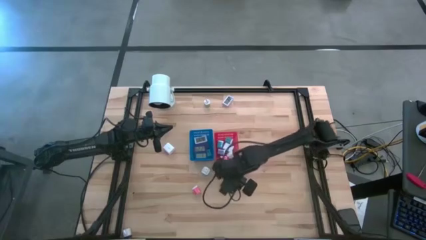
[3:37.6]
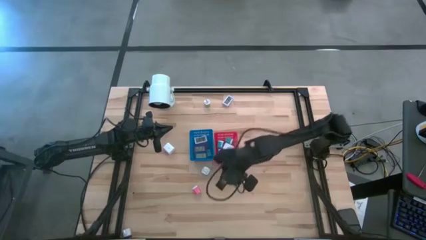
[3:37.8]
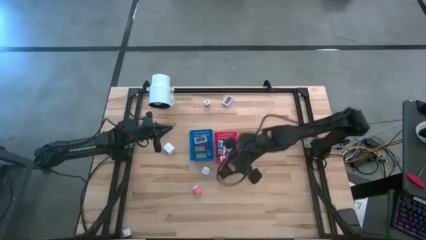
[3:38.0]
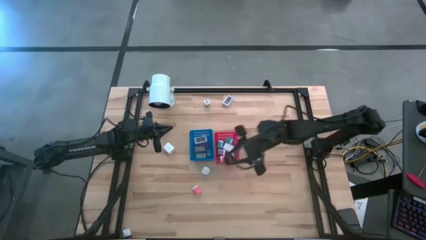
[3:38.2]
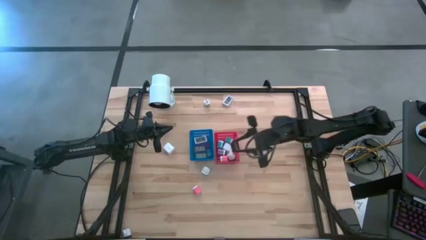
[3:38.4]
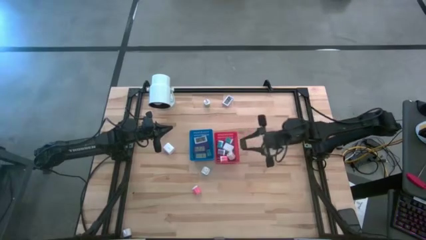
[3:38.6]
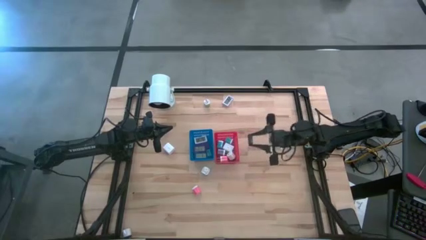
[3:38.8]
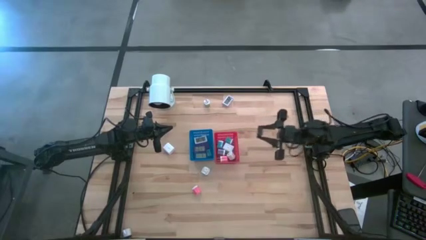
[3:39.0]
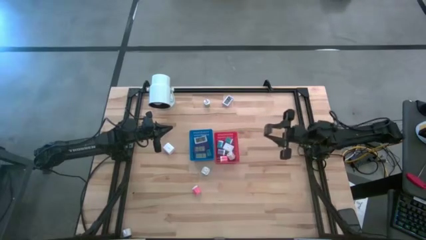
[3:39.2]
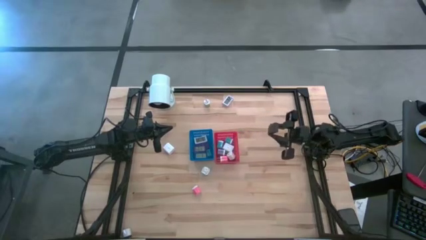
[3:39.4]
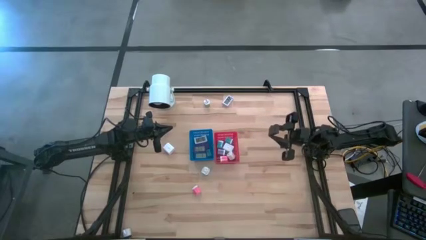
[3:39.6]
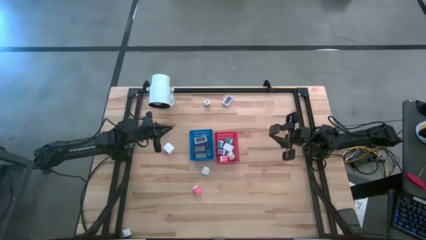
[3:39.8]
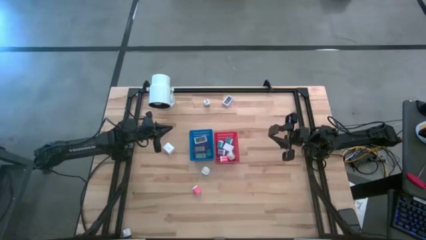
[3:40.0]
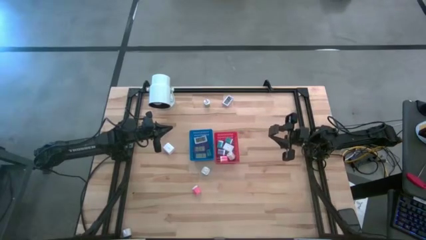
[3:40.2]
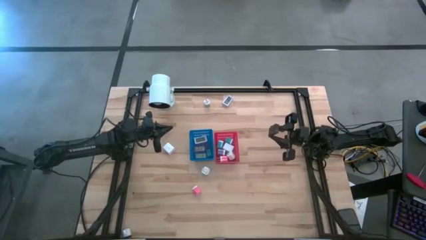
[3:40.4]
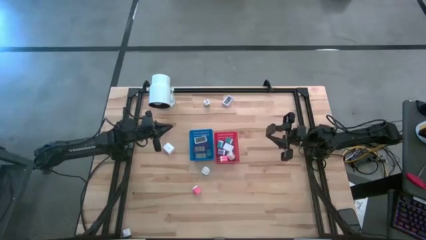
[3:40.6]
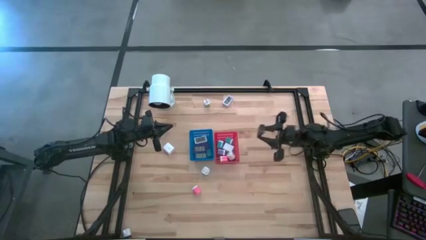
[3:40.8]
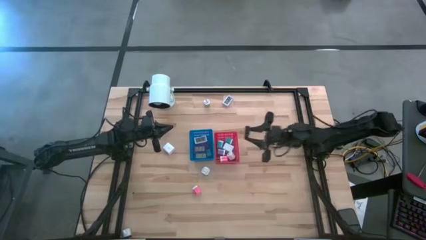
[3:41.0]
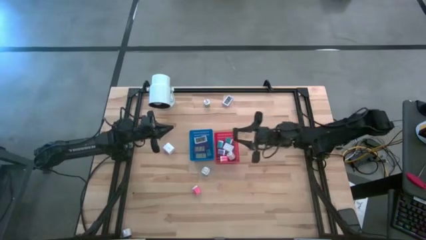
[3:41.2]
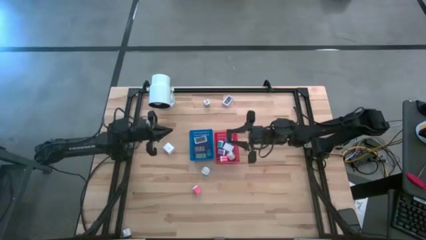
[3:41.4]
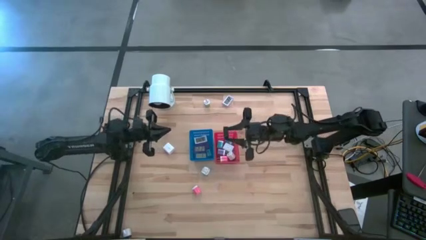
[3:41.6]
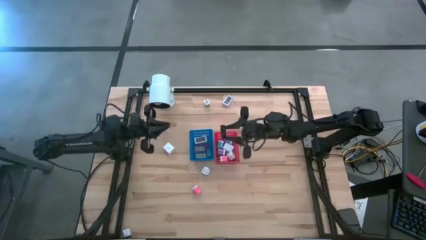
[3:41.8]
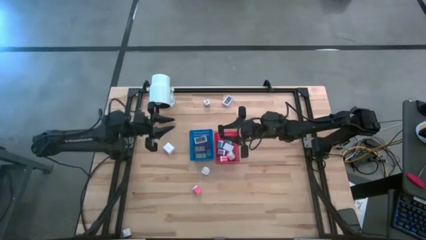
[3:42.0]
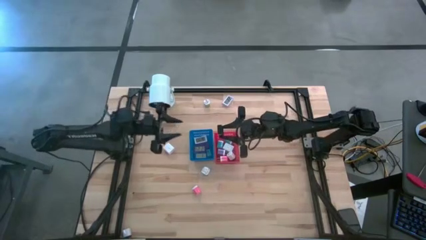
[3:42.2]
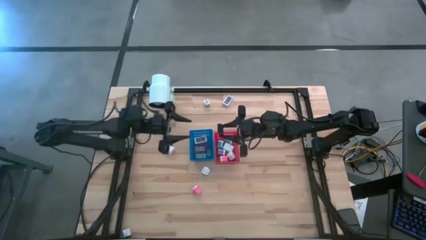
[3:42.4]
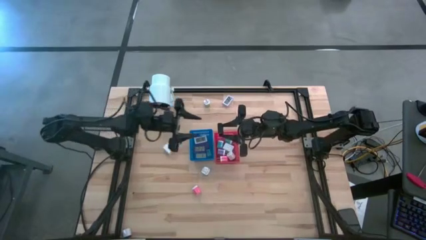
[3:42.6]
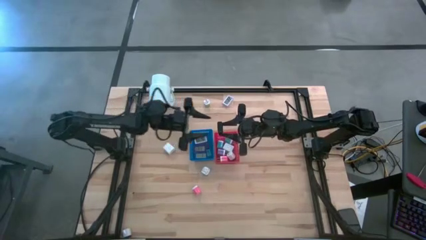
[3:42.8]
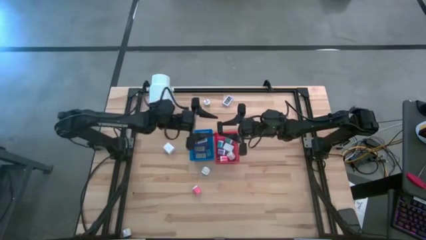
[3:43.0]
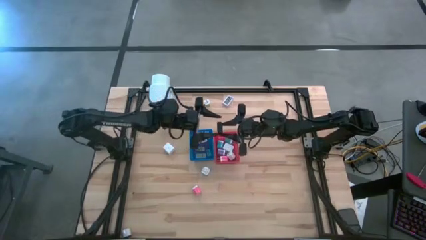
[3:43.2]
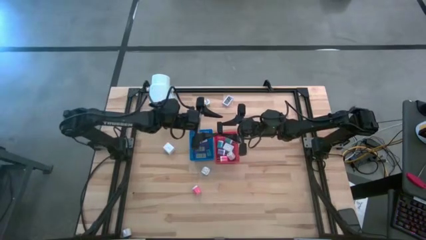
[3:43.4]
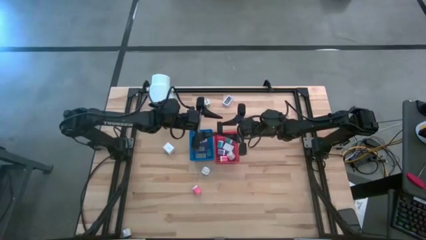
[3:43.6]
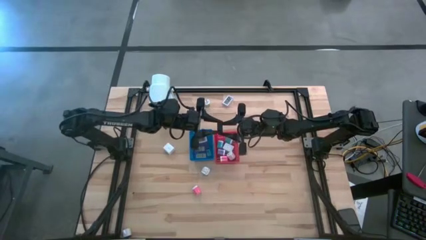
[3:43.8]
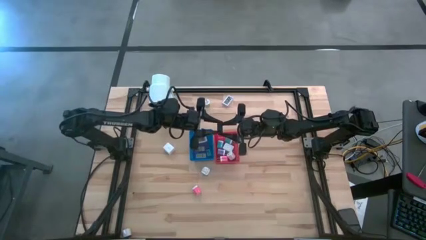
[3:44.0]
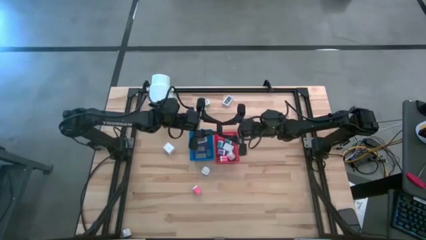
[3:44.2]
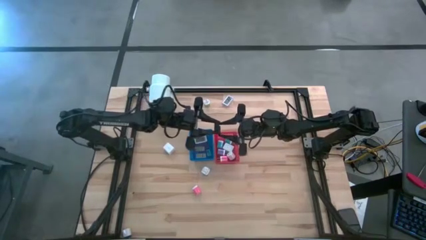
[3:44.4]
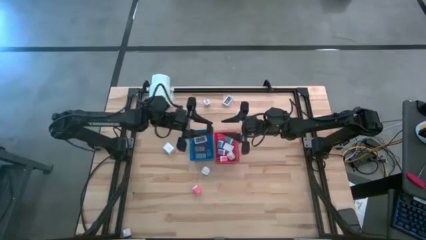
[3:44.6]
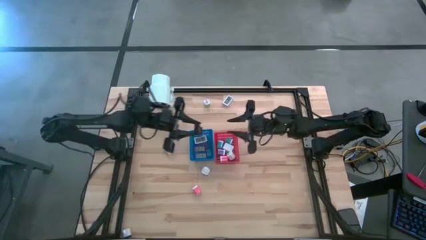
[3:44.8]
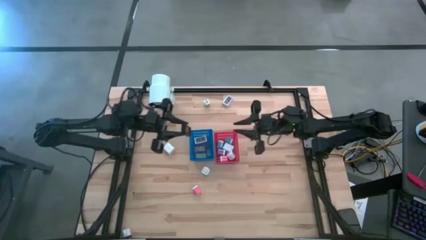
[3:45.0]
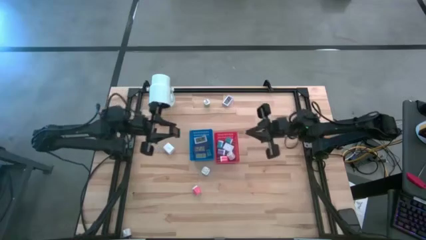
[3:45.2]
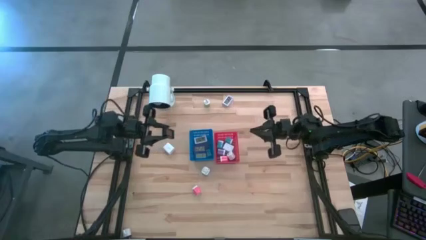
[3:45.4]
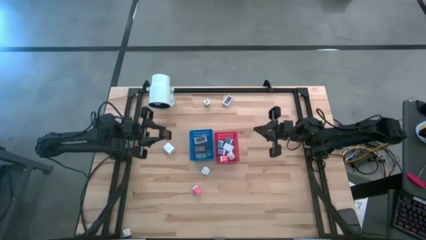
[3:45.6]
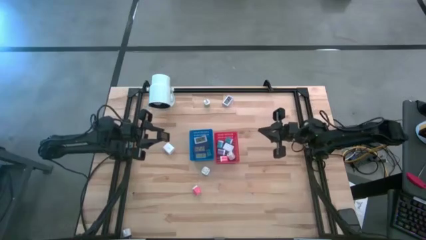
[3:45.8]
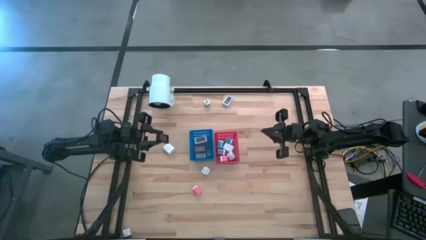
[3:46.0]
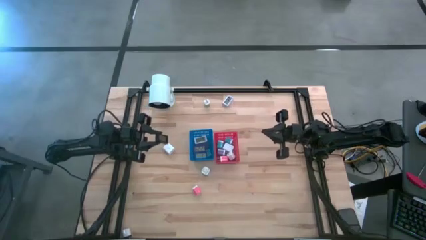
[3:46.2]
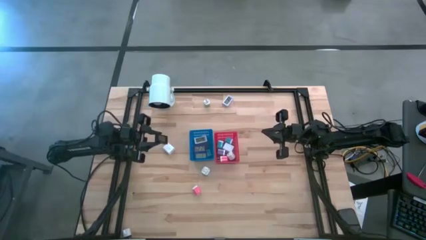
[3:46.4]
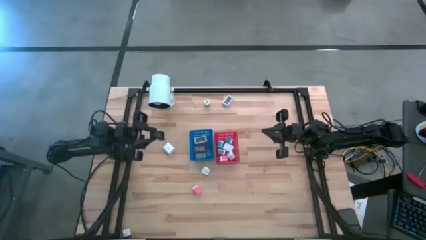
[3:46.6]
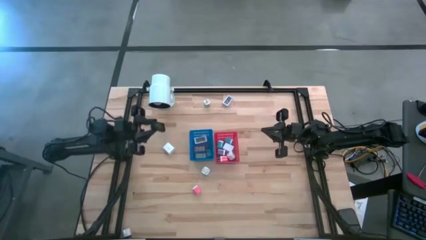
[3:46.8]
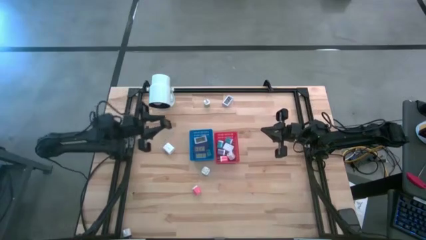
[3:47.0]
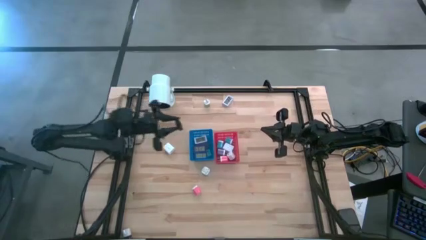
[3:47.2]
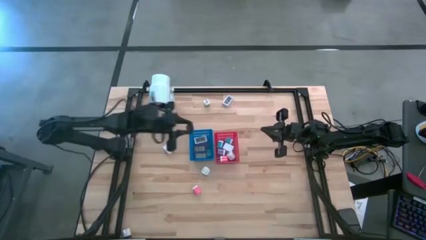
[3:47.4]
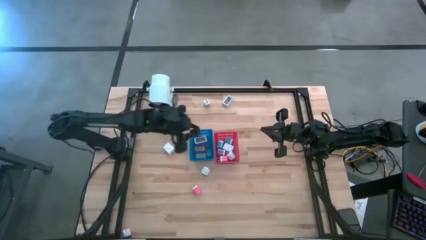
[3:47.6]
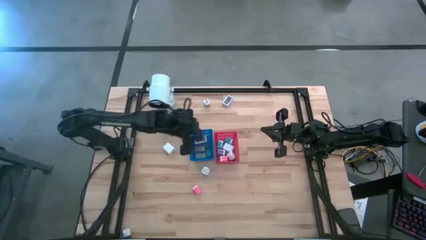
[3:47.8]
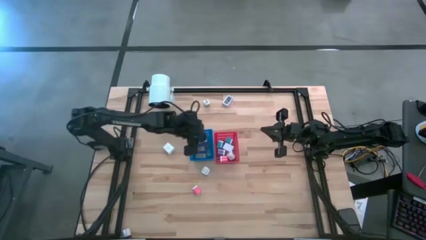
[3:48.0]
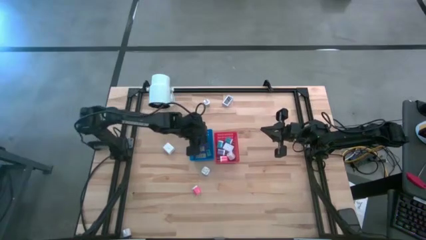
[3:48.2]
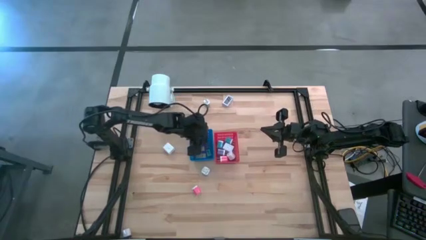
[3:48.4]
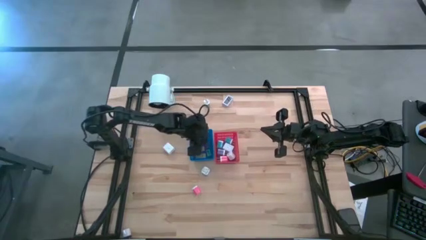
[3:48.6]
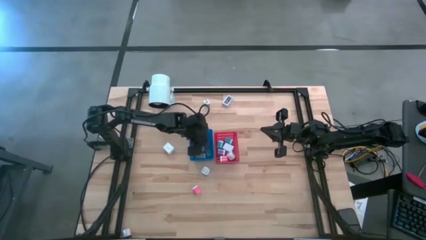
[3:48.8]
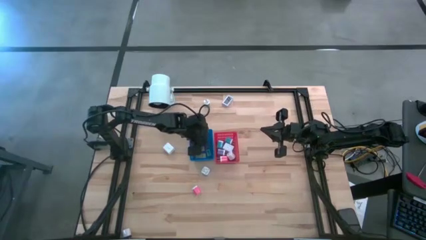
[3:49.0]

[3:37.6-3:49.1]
Task: Pick & Place Office items
Put the black digital clock into the blue bin

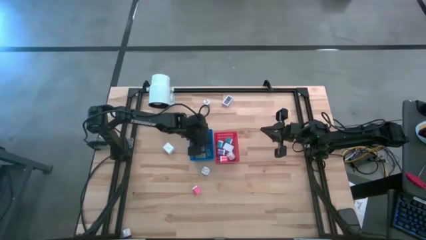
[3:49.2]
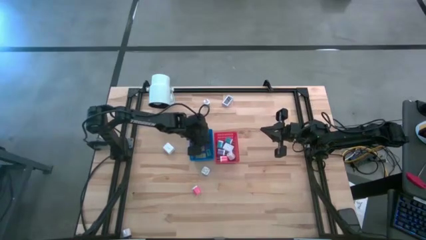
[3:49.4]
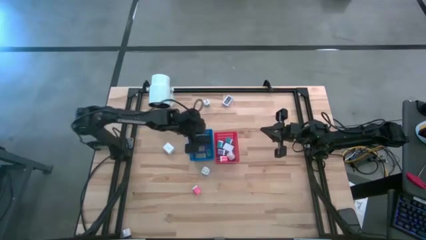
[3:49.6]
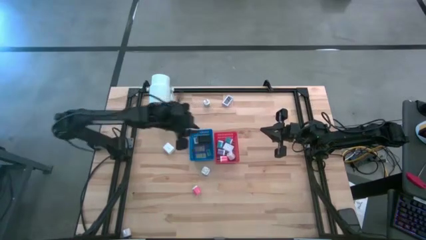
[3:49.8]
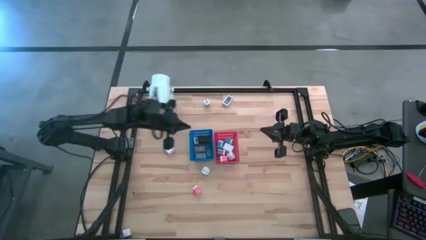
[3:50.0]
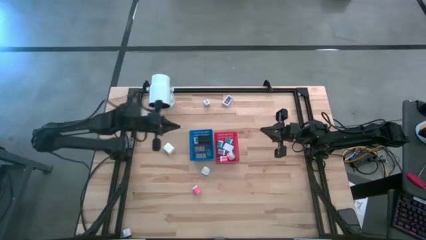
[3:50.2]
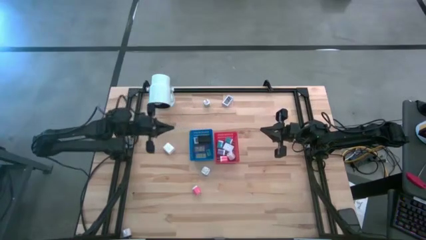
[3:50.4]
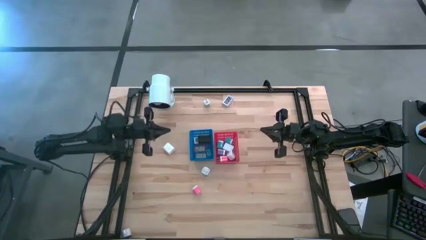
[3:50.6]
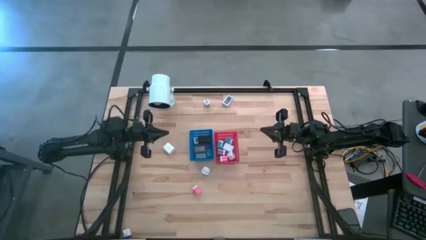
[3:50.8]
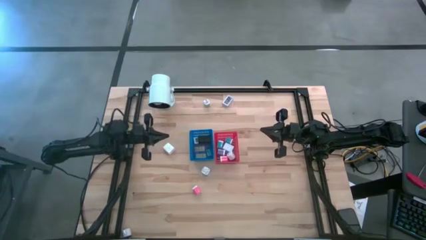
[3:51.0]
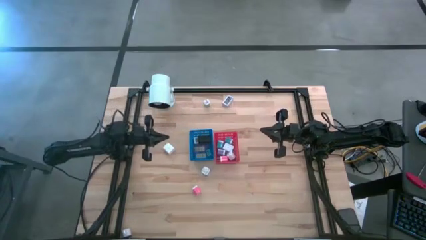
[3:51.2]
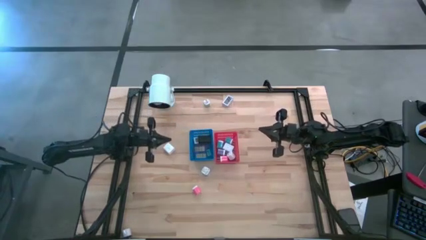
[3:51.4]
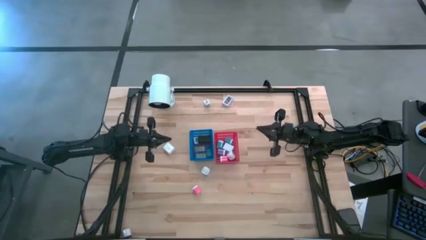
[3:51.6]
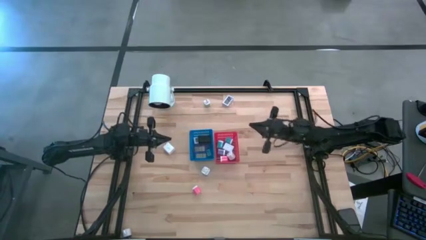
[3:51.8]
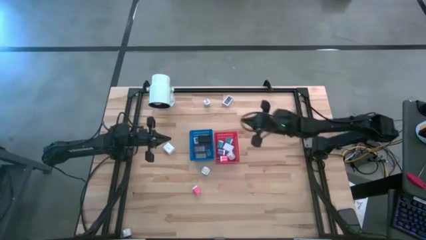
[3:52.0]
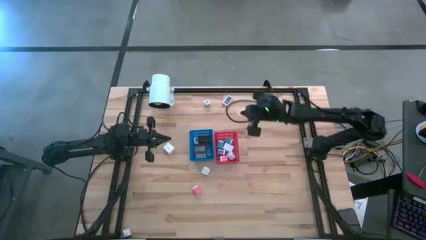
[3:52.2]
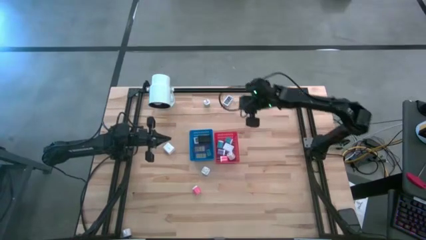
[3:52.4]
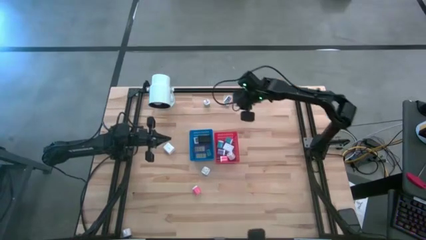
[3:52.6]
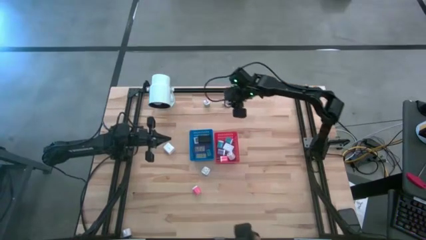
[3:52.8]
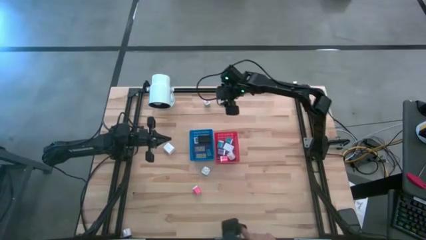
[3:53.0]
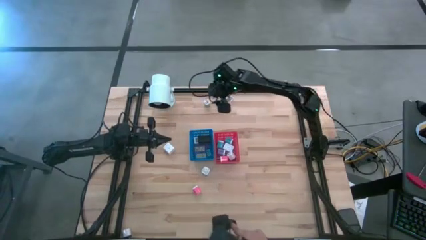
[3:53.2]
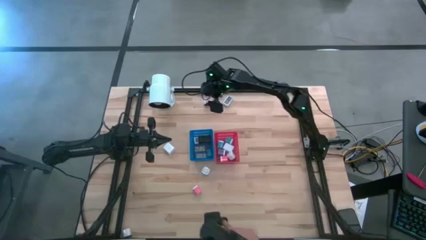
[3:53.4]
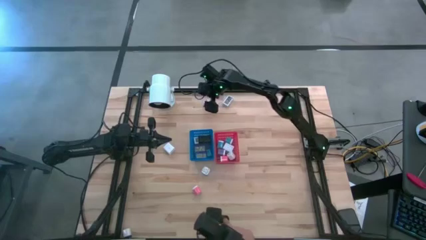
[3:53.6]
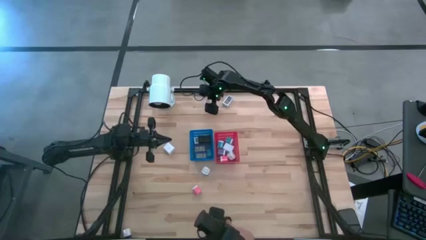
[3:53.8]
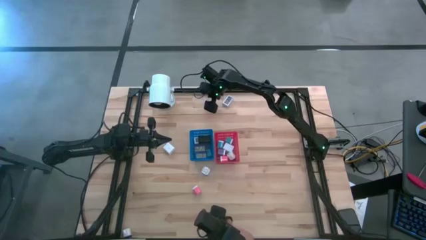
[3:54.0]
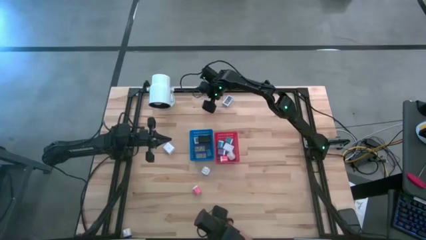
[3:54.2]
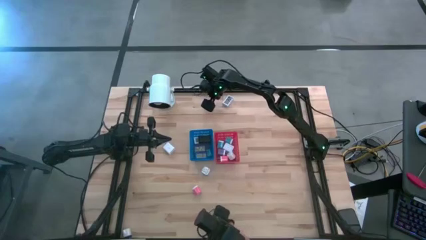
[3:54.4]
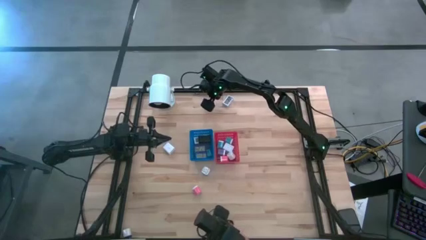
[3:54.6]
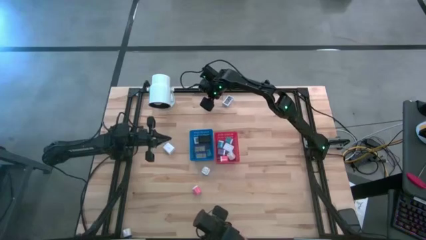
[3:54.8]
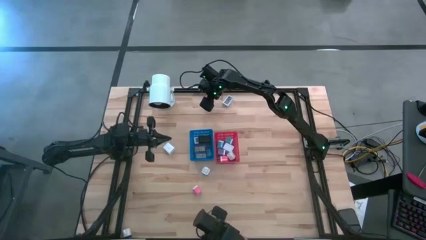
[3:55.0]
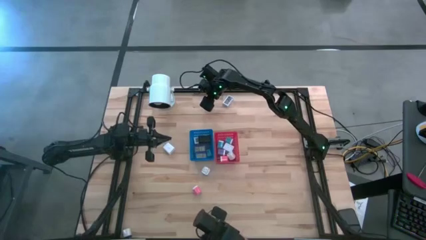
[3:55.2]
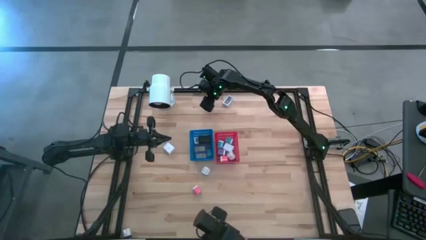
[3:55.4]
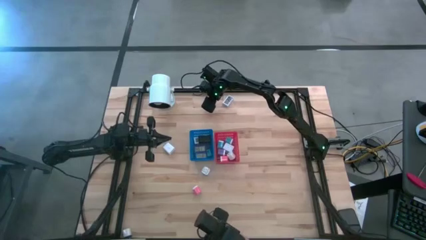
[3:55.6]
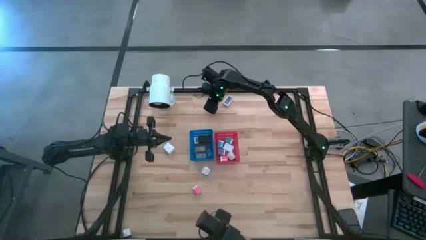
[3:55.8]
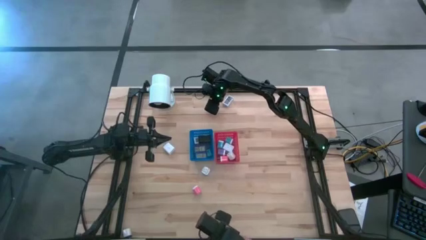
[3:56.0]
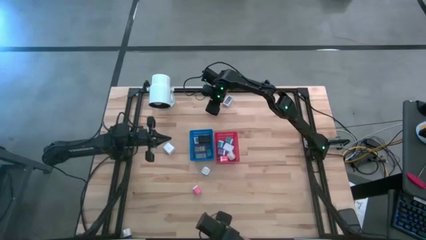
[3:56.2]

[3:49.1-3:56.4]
Put the green charger adapter into the red bin
